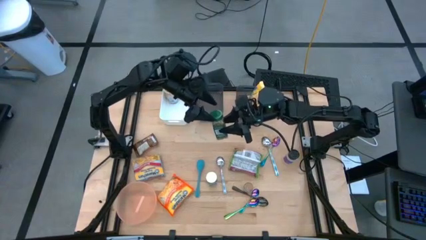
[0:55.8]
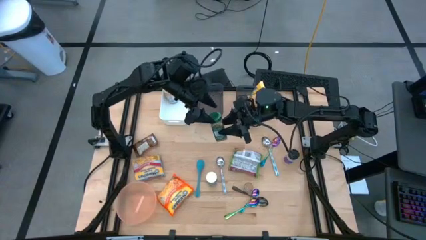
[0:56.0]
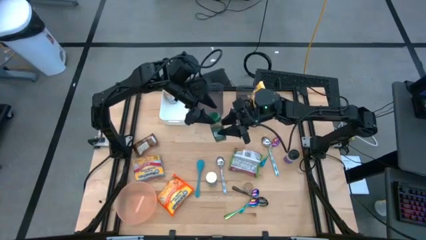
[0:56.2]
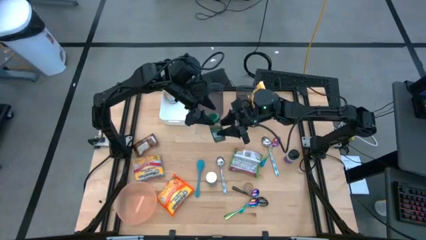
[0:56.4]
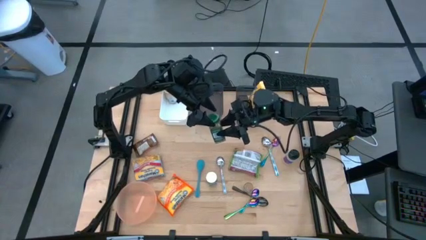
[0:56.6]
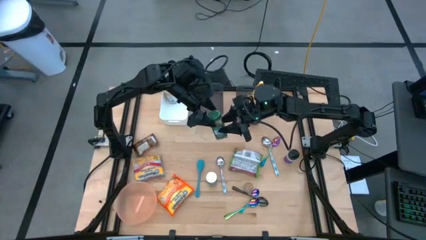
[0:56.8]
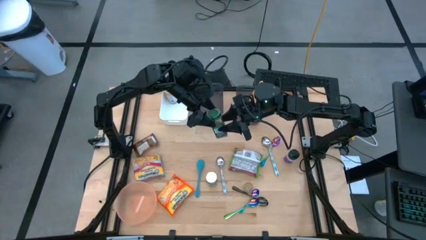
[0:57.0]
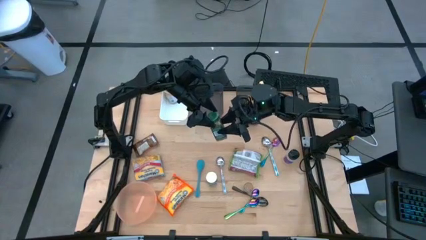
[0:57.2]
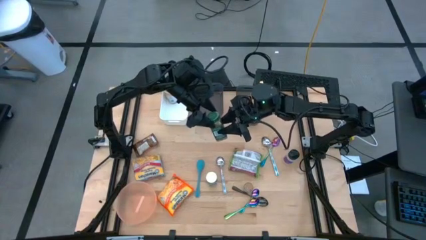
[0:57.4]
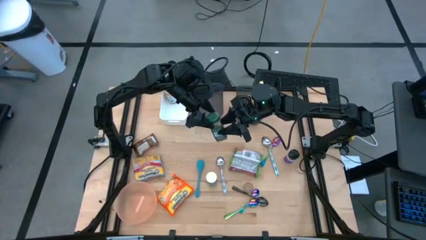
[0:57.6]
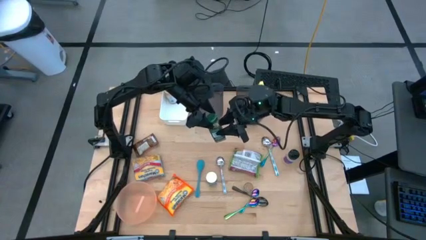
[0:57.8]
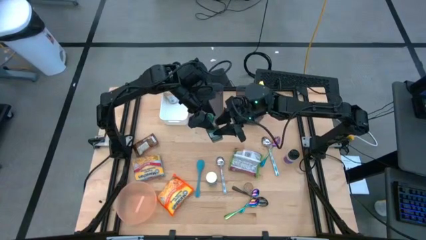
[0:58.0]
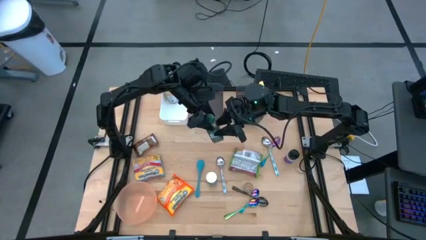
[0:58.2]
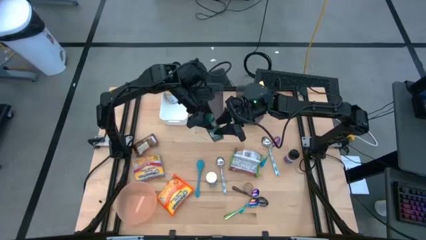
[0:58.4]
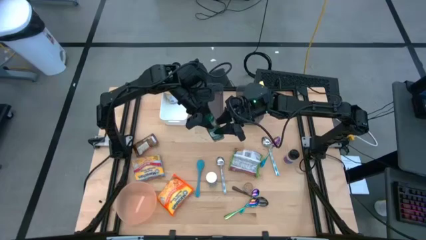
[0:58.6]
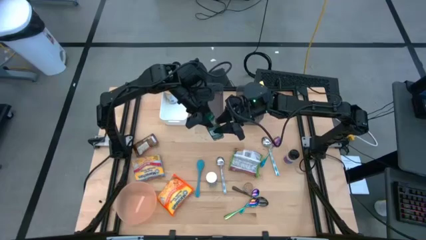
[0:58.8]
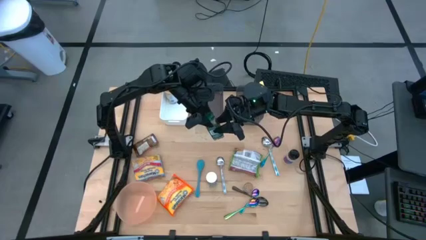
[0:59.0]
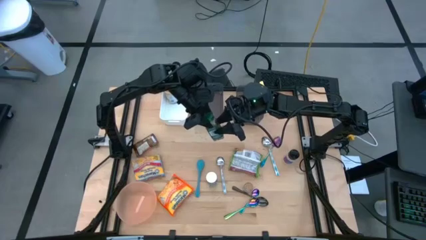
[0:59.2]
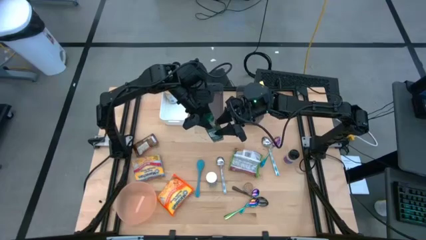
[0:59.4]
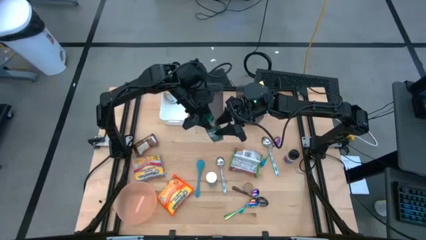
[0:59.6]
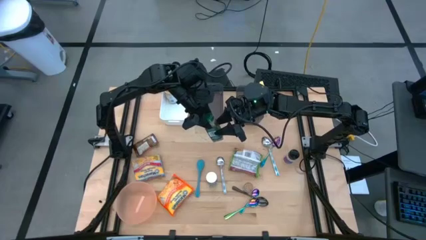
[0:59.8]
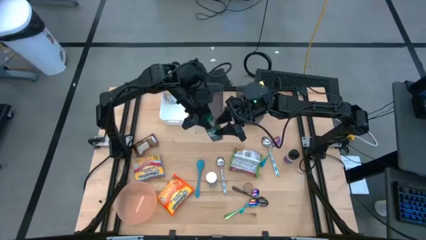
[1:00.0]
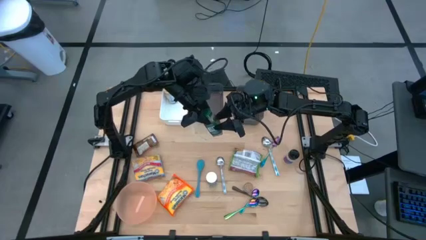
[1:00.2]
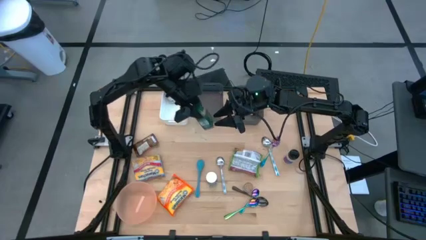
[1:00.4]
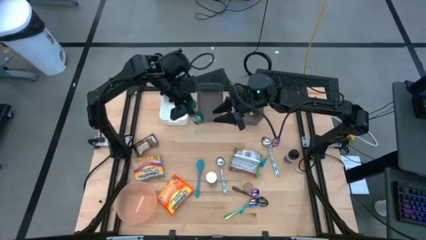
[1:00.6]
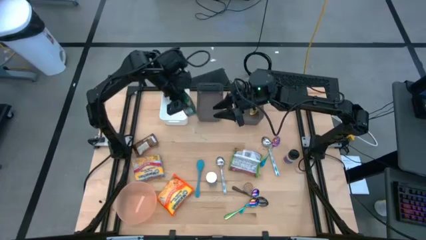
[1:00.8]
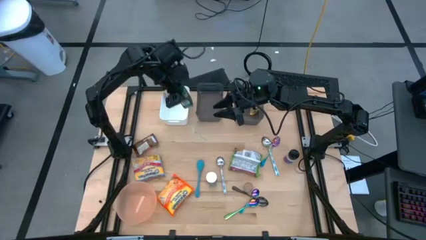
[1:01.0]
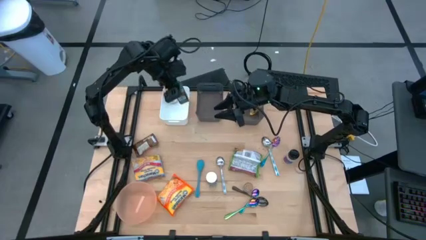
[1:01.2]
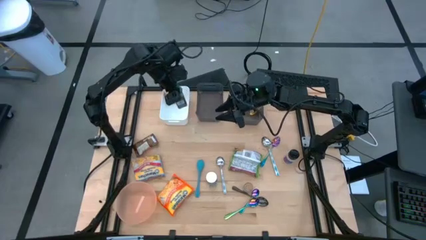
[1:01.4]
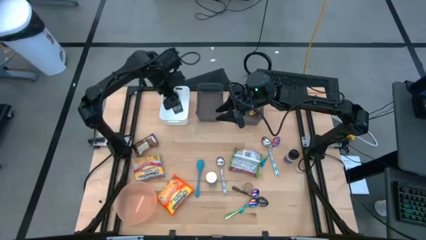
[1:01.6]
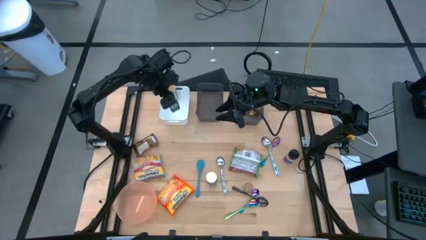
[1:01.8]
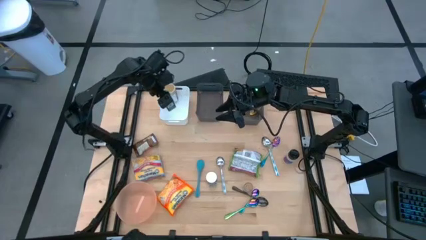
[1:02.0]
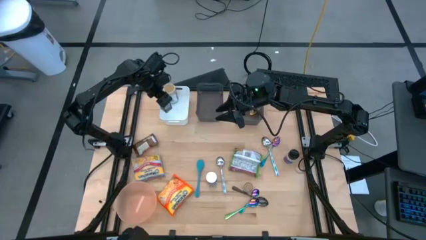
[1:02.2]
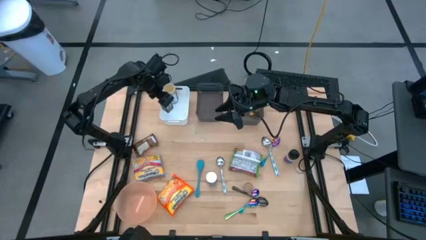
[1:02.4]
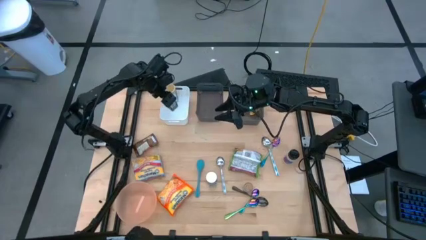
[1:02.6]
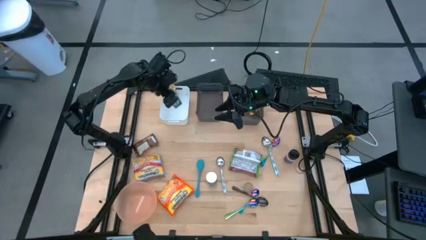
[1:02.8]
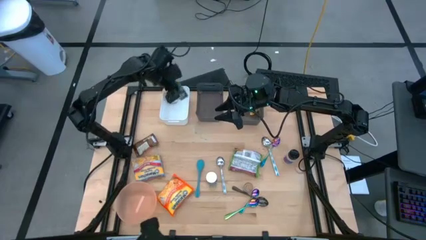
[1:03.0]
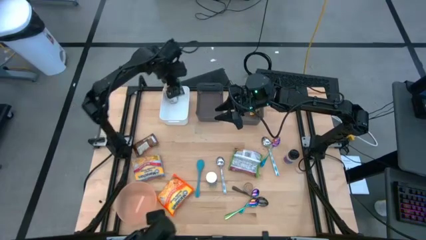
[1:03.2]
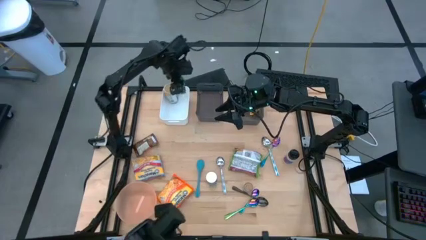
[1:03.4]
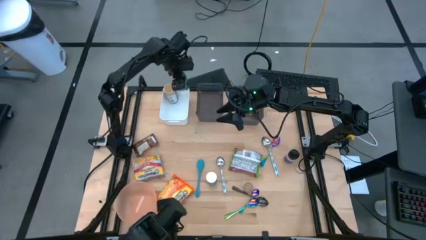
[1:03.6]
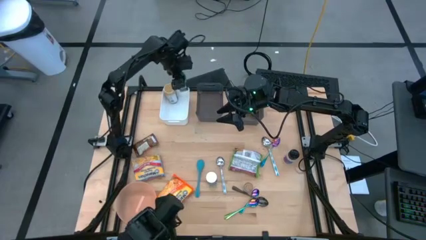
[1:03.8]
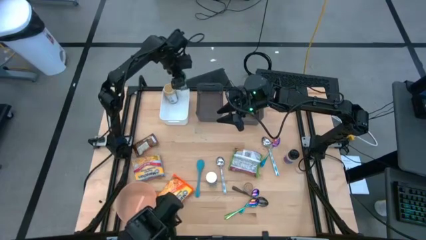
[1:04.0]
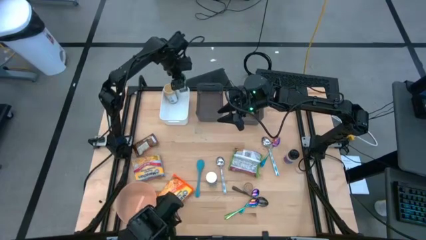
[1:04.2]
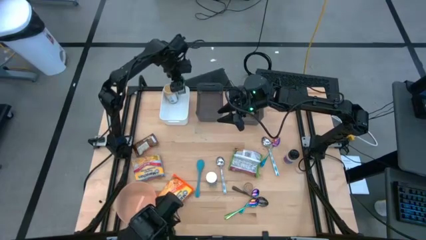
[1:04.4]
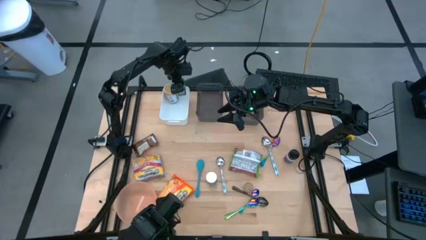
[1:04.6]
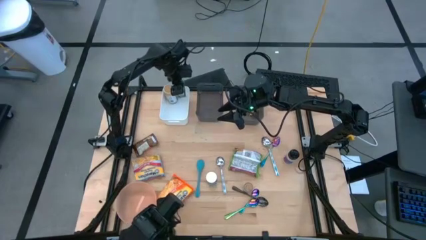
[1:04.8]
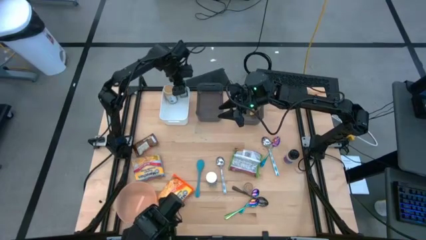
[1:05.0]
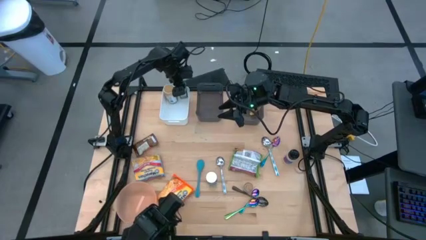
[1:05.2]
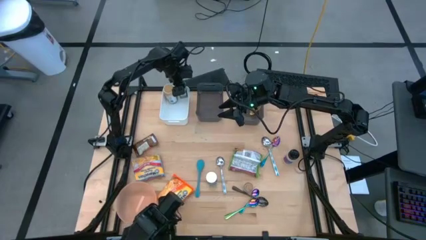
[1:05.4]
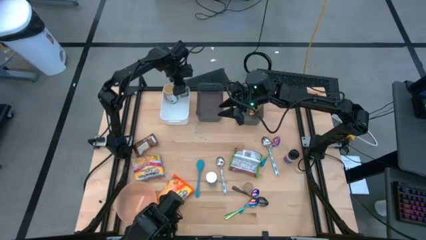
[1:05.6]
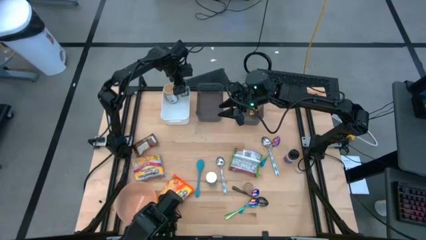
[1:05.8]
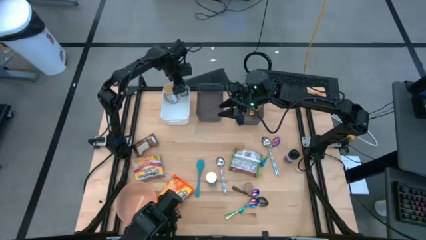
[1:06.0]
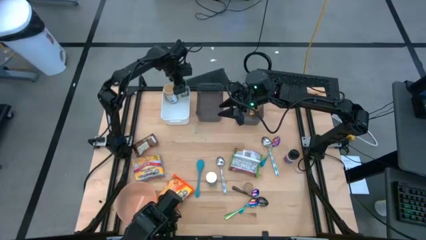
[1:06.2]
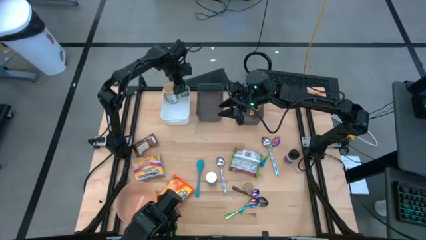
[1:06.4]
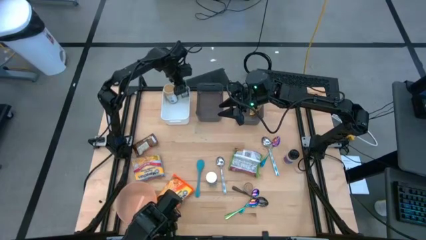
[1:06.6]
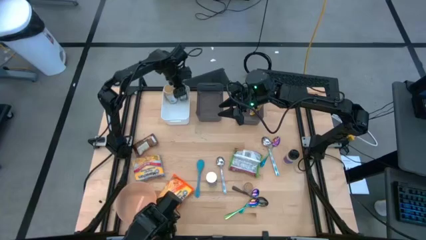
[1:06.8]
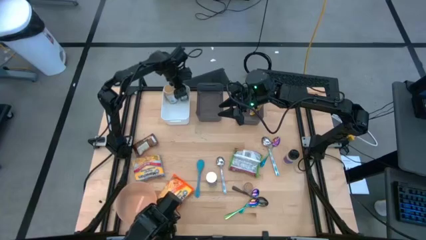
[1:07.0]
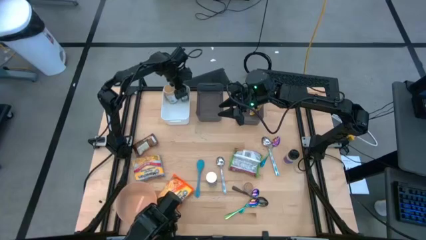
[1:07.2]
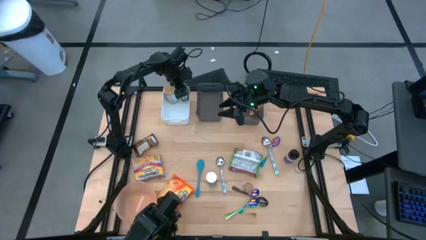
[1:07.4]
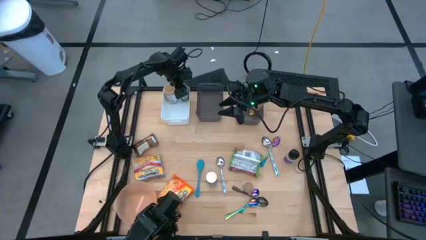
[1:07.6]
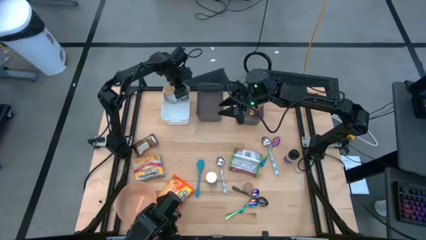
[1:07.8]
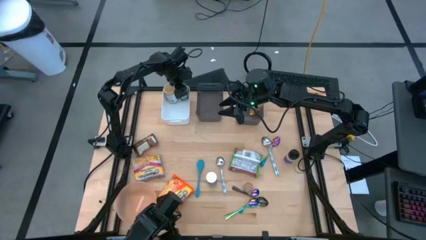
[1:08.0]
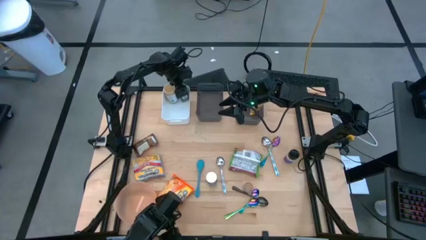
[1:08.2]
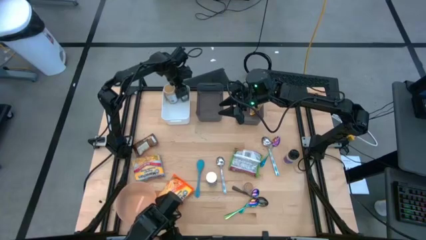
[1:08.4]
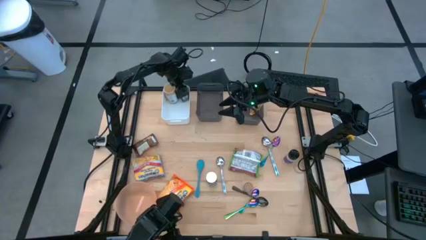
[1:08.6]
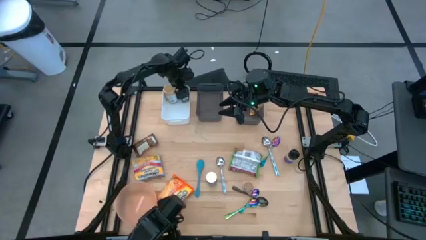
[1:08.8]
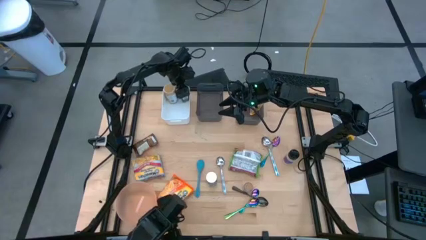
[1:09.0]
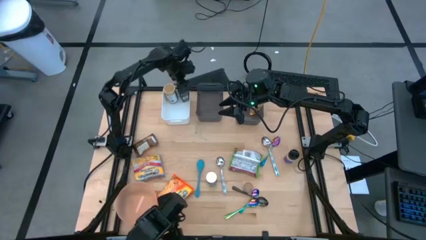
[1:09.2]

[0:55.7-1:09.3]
Task: Pick & Place Food Item
Put the green seasoning bottle into the white bin
